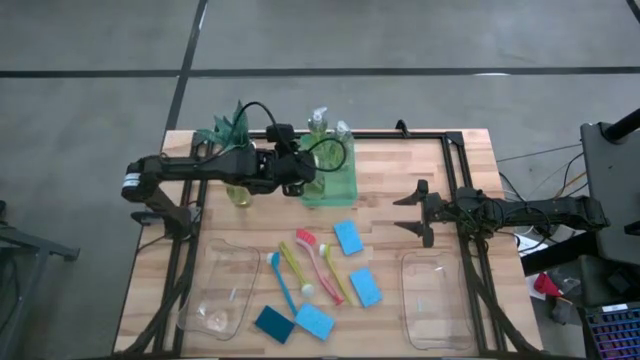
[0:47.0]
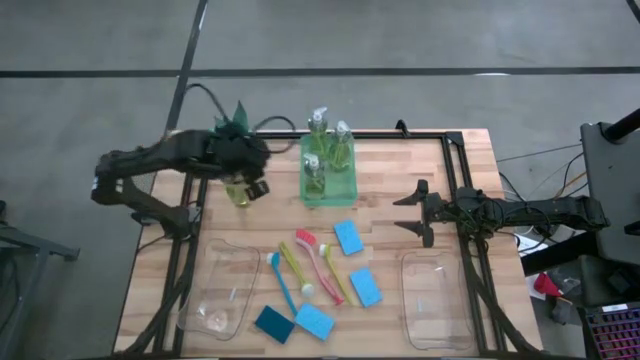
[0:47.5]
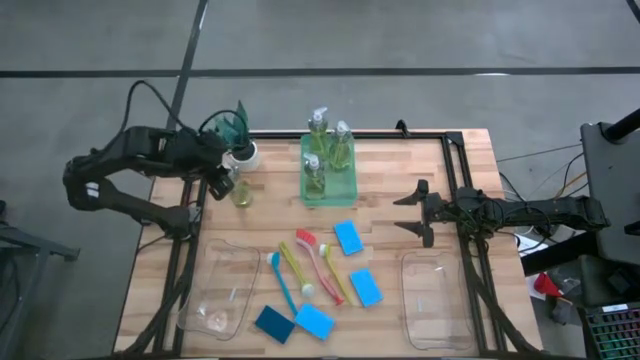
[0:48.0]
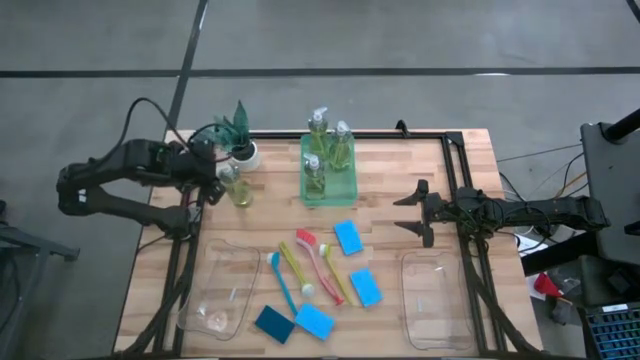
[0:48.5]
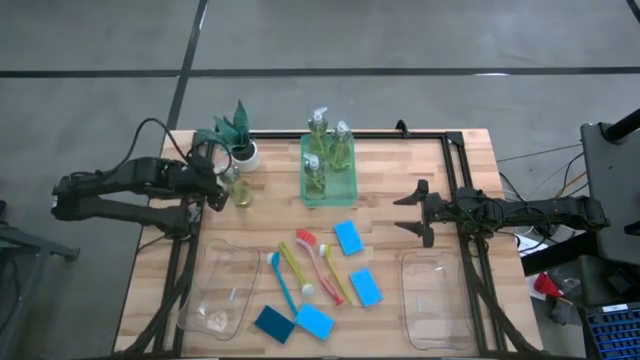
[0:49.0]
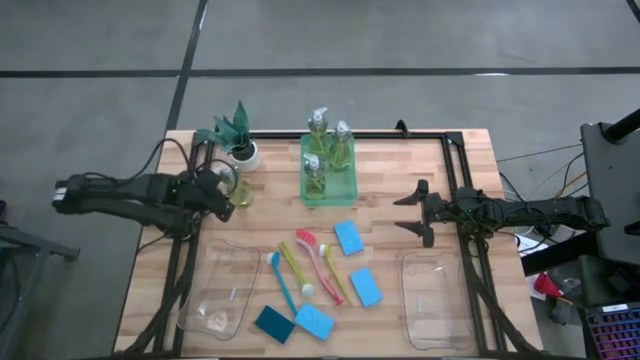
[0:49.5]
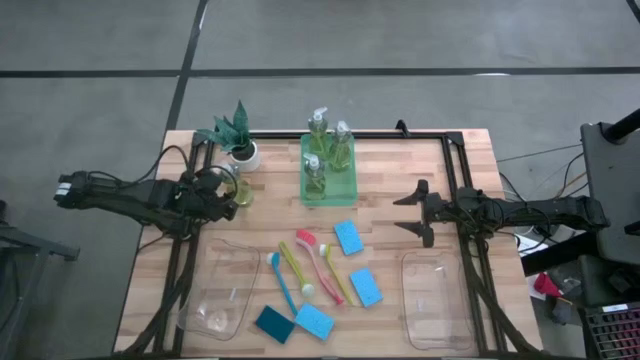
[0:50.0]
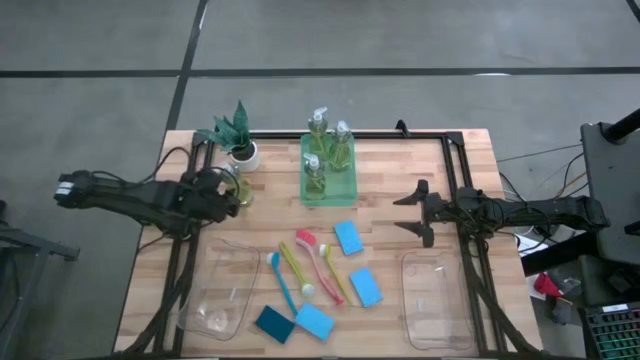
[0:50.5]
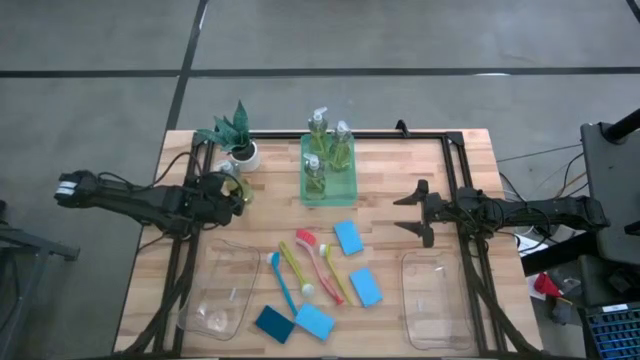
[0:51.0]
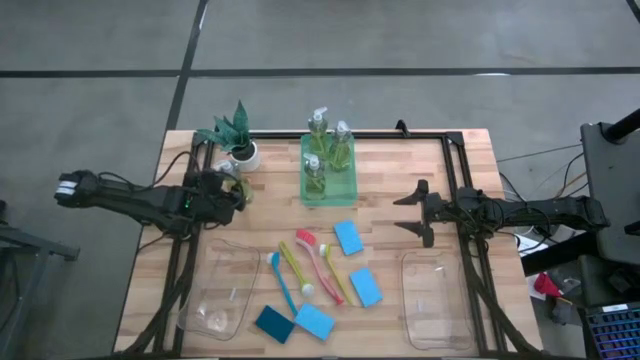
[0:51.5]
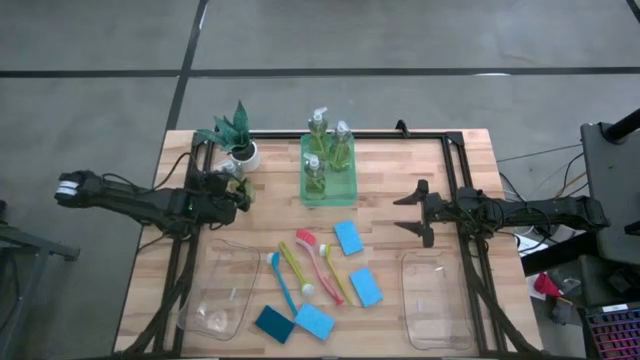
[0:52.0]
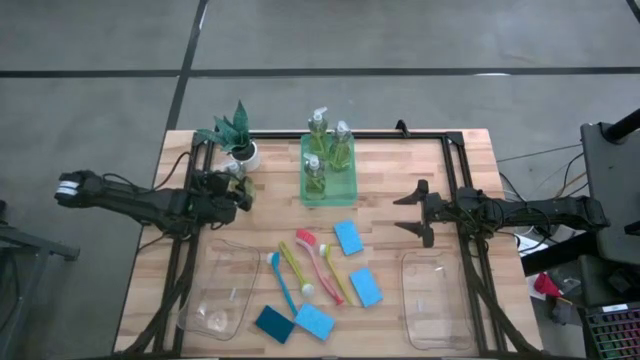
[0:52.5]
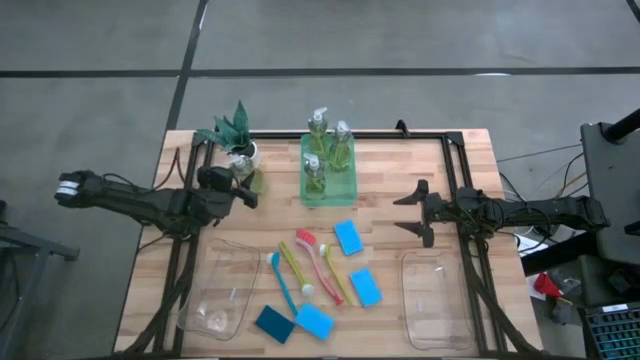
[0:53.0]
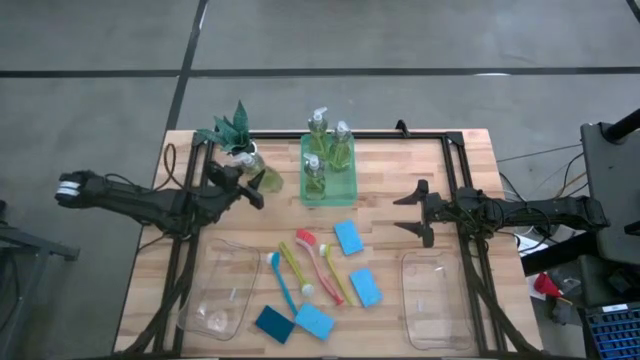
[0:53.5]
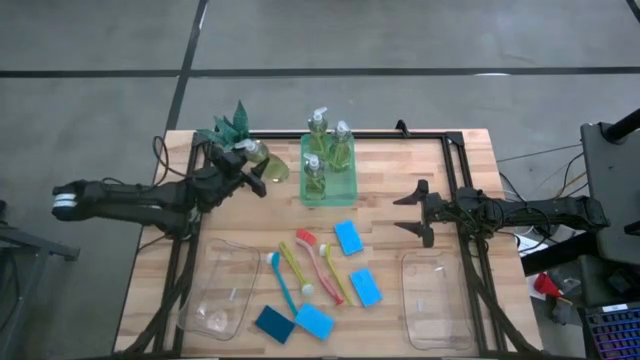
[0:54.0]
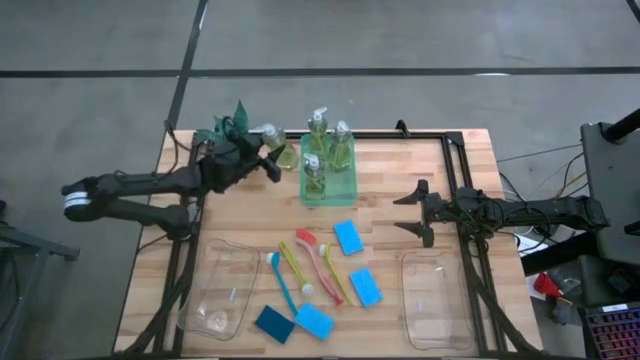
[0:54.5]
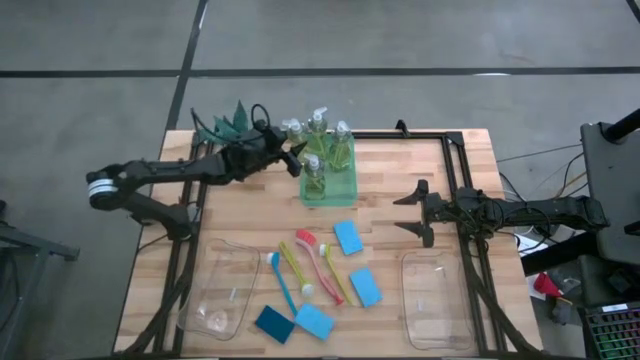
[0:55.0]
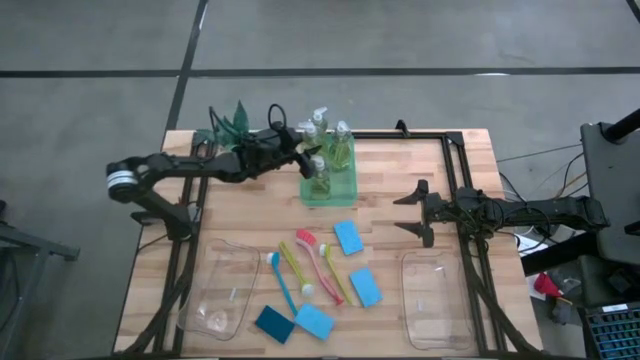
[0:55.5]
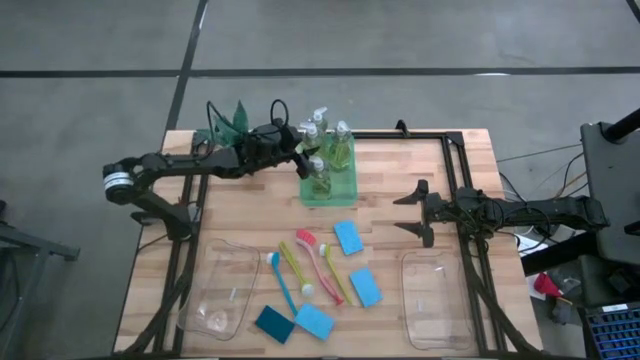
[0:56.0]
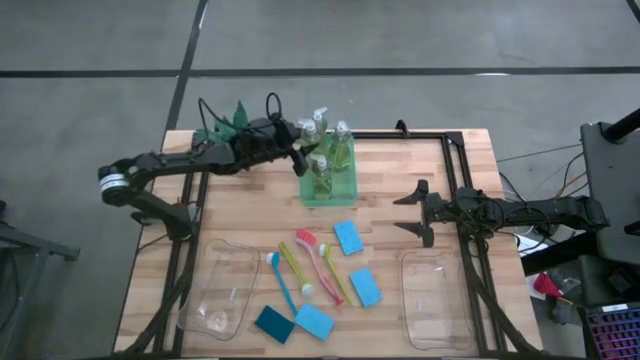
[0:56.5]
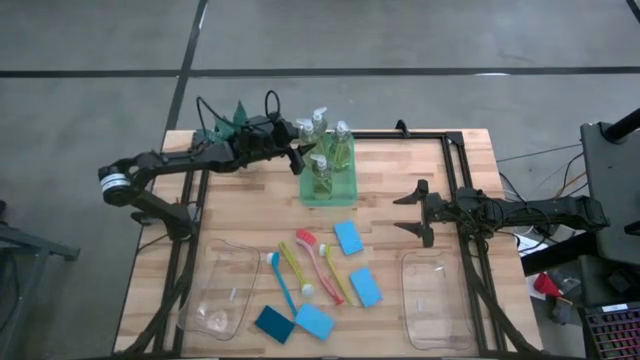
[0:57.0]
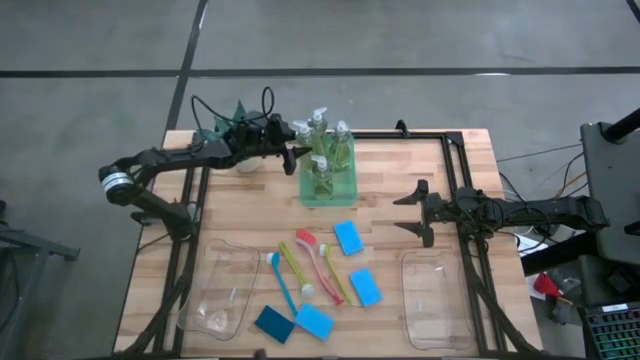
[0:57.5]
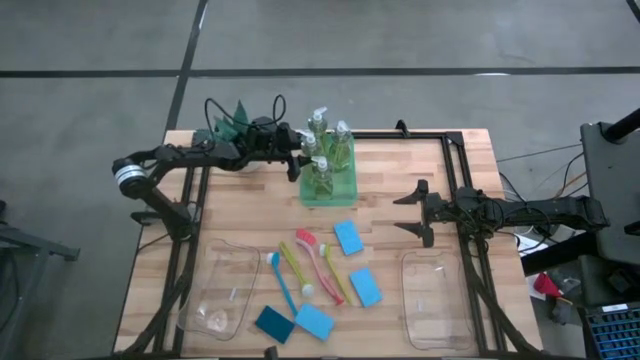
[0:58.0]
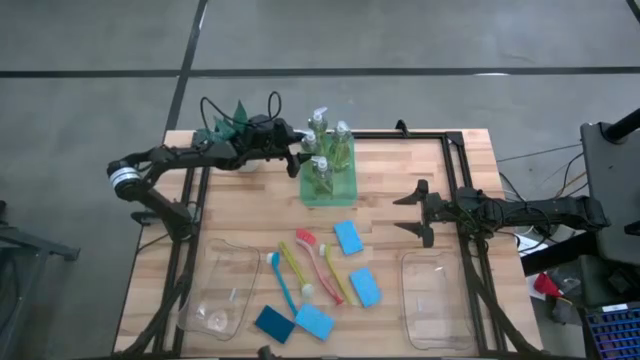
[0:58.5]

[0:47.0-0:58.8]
Task: Pick & Place Kitchen Sink Supplies
Put the dishwashing liquid into the green bin

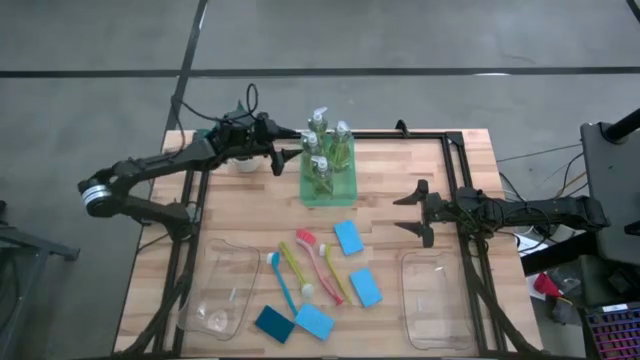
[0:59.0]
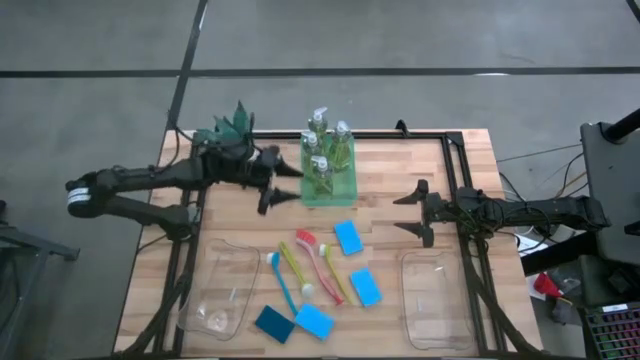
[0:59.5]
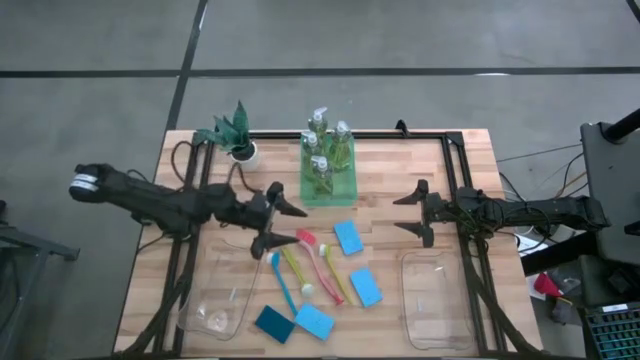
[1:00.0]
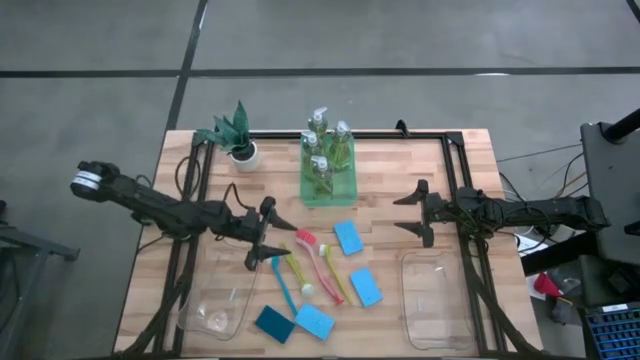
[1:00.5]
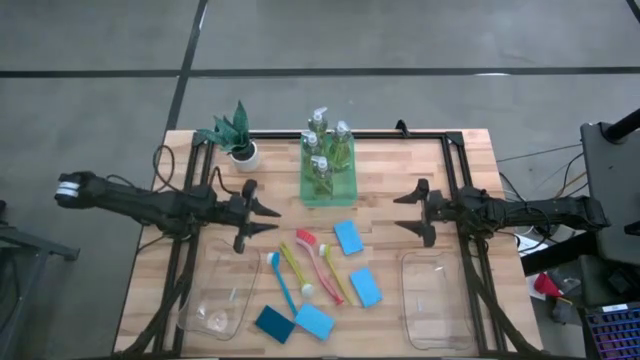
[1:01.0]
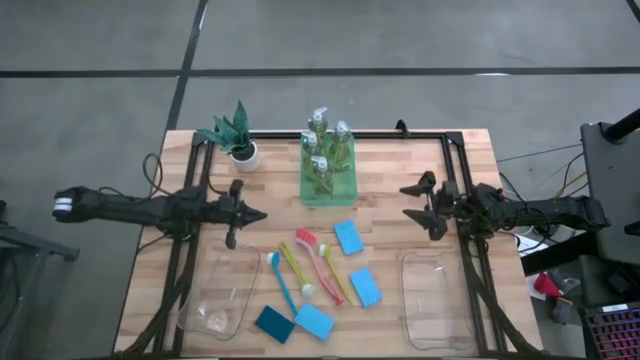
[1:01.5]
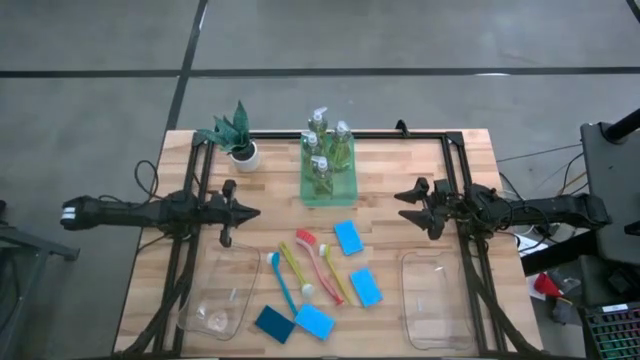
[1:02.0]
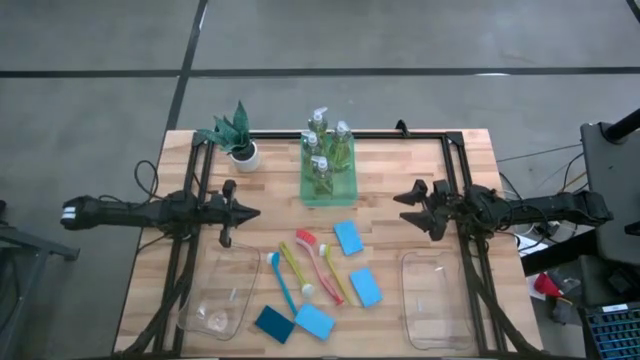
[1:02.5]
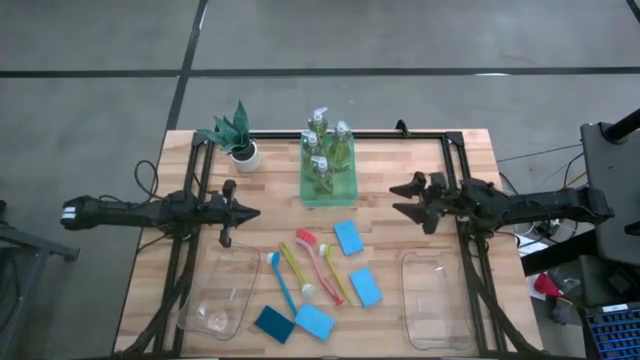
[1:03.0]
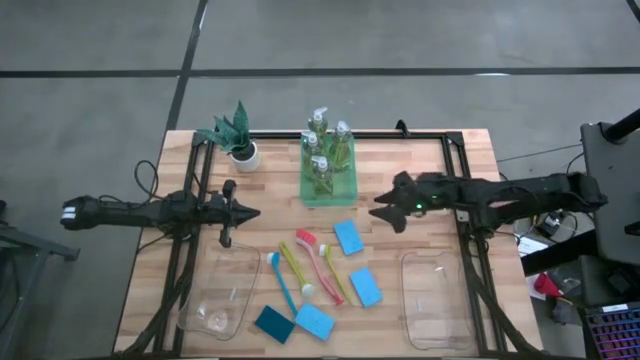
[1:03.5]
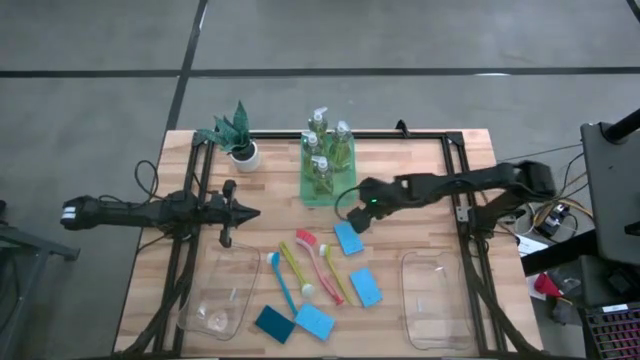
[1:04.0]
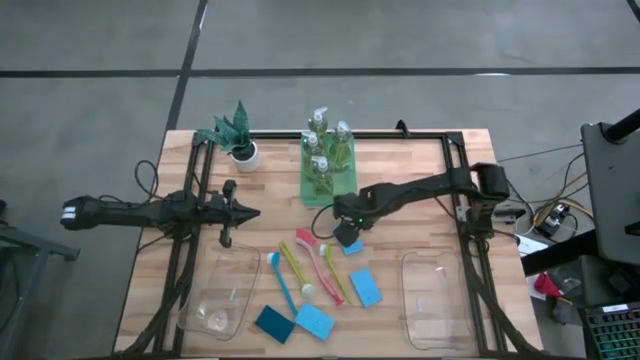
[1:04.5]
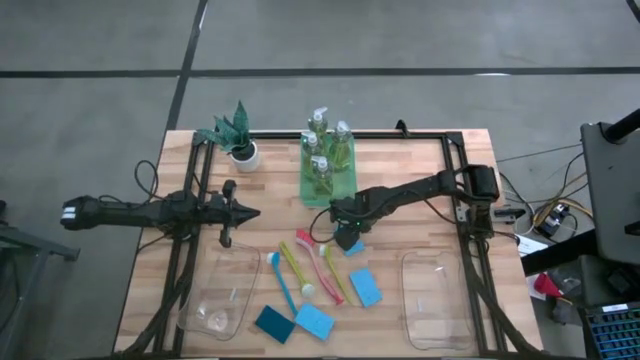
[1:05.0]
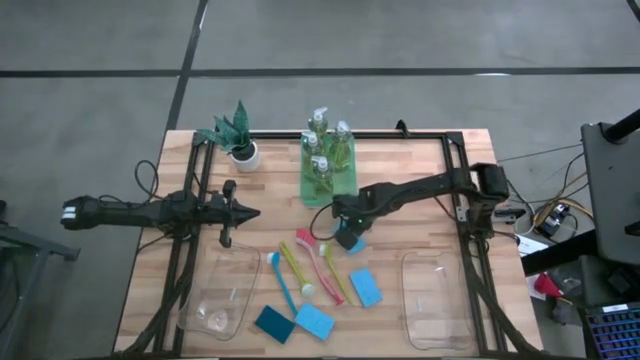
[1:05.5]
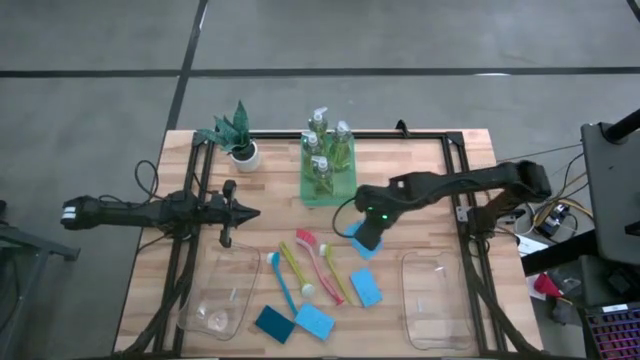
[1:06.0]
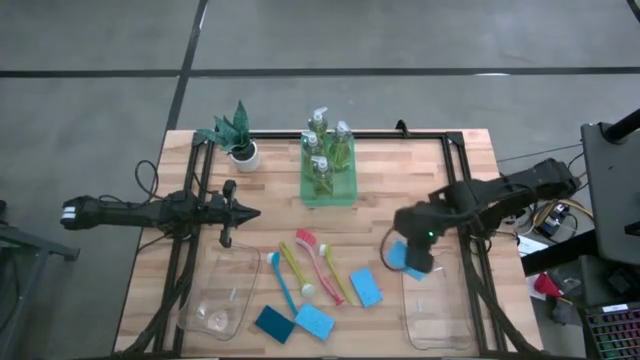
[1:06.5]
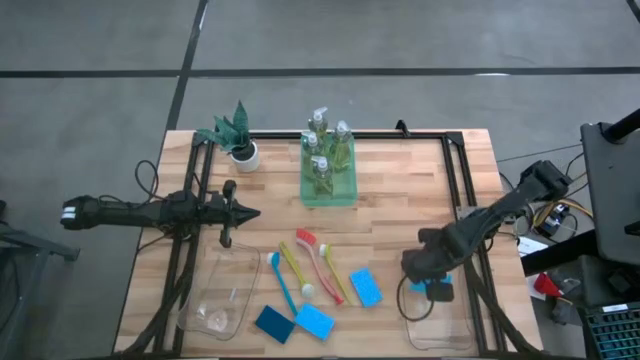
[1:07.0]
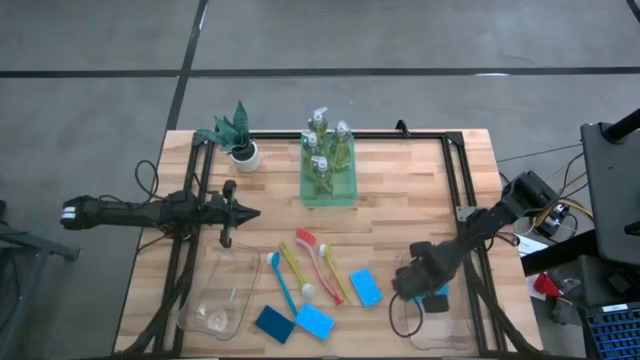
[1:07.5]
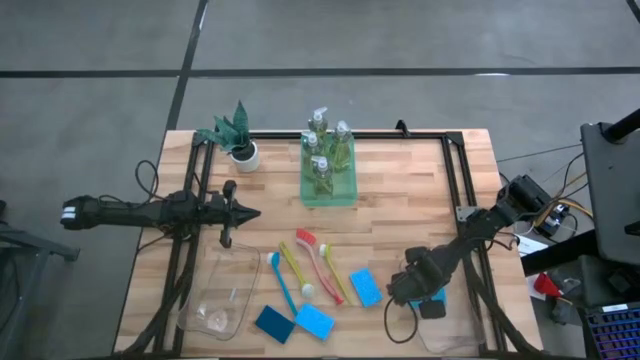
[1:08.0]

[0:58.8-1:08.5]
Put the top right blue sponge into the right transparent bin
